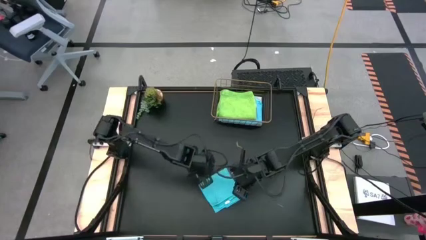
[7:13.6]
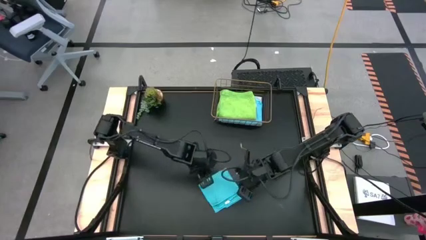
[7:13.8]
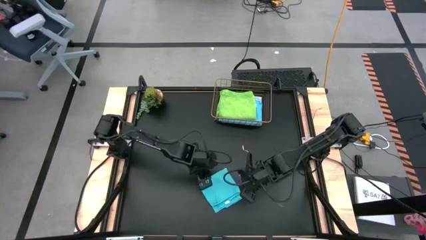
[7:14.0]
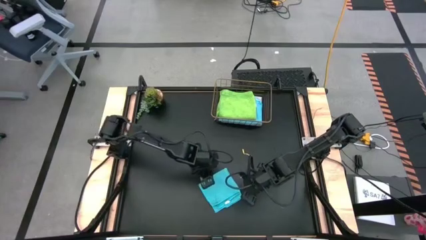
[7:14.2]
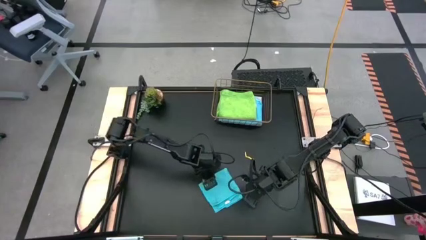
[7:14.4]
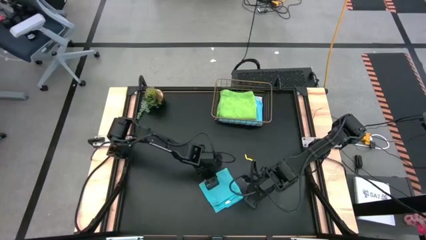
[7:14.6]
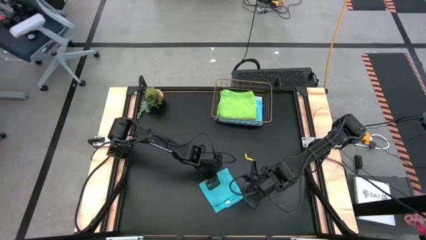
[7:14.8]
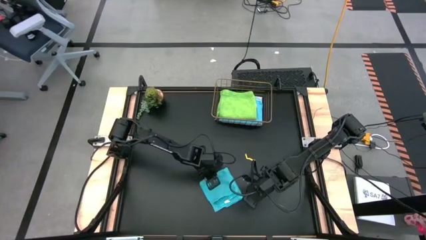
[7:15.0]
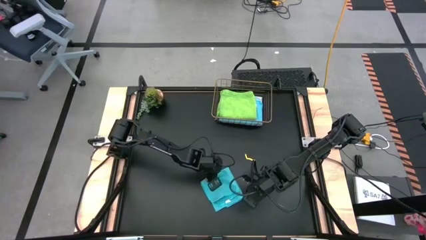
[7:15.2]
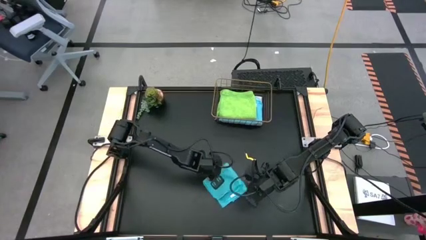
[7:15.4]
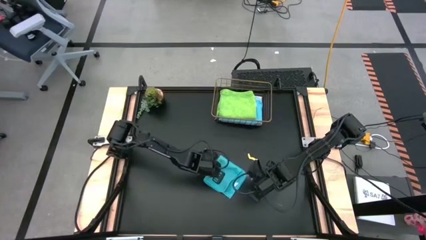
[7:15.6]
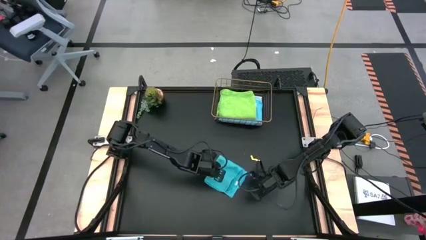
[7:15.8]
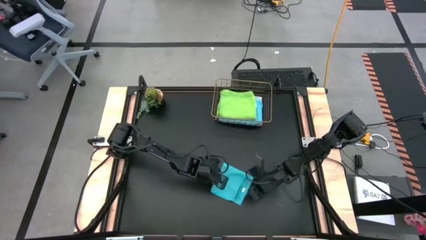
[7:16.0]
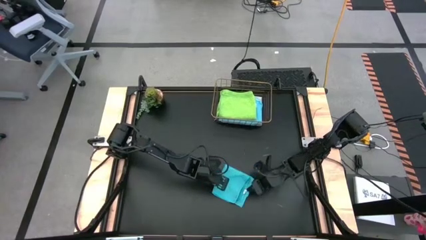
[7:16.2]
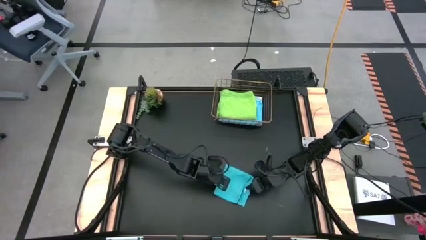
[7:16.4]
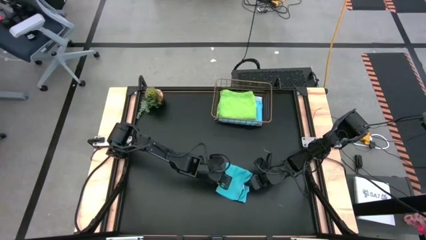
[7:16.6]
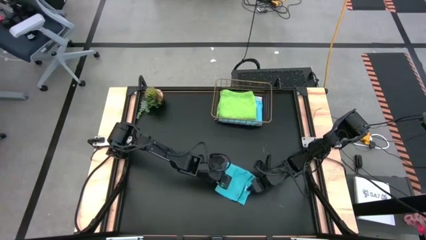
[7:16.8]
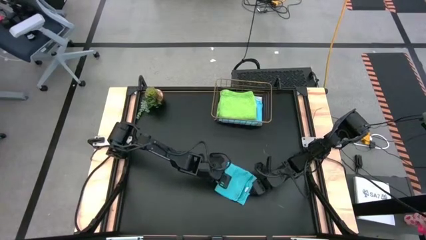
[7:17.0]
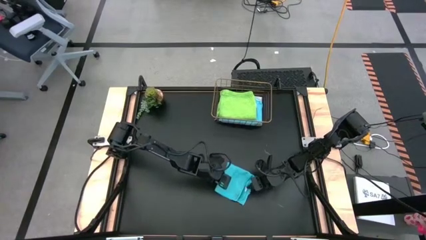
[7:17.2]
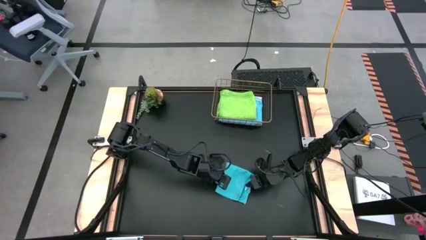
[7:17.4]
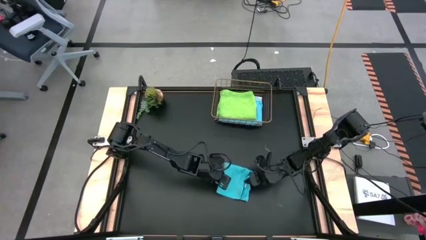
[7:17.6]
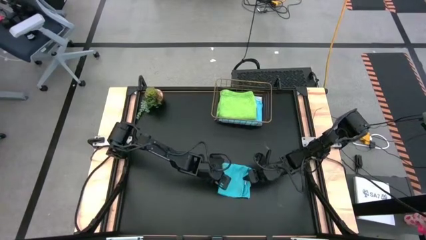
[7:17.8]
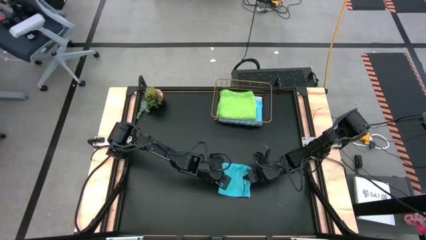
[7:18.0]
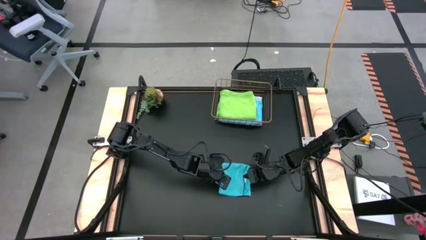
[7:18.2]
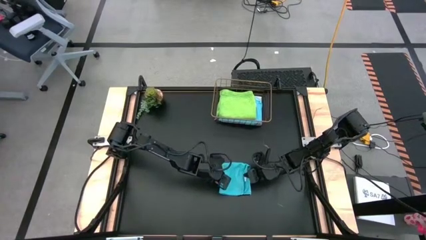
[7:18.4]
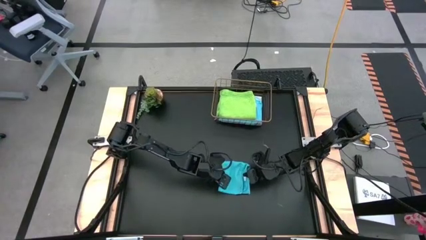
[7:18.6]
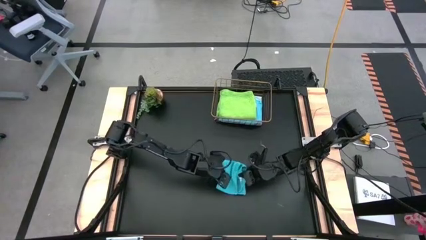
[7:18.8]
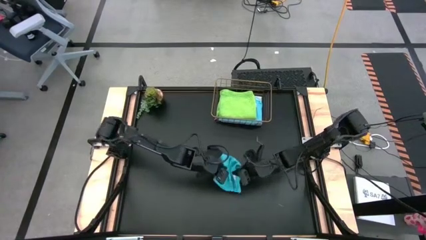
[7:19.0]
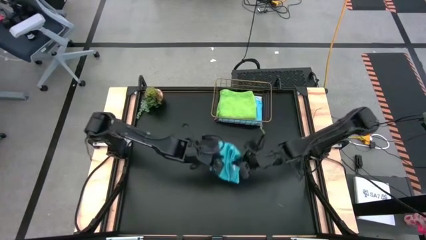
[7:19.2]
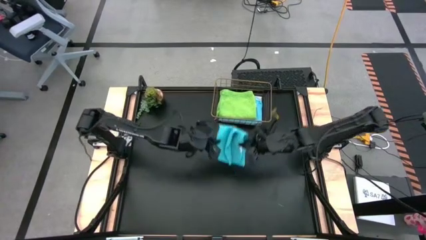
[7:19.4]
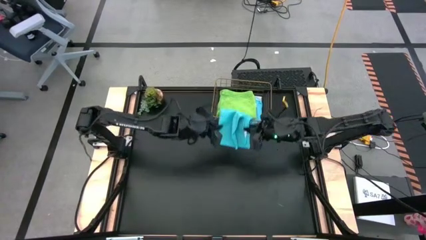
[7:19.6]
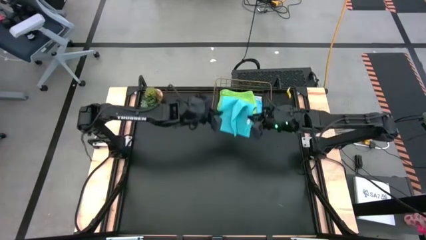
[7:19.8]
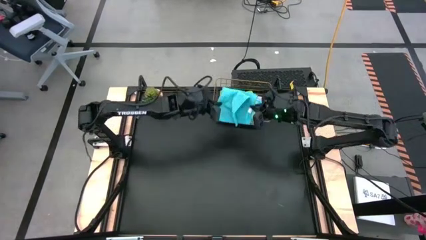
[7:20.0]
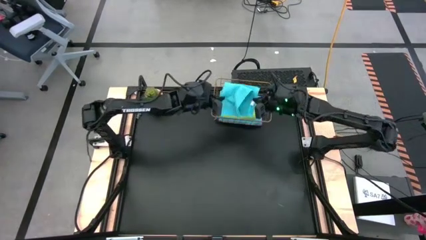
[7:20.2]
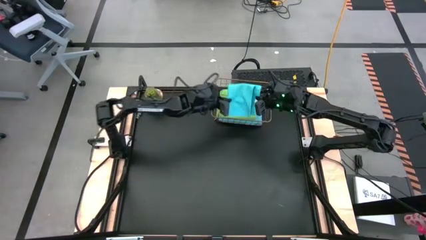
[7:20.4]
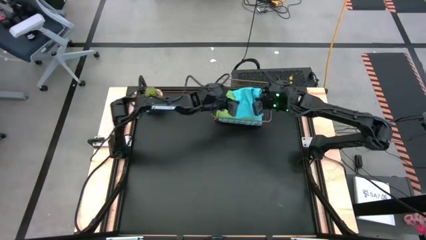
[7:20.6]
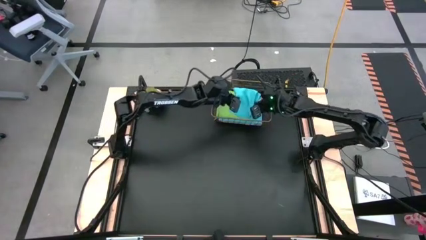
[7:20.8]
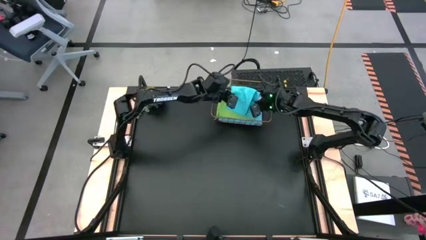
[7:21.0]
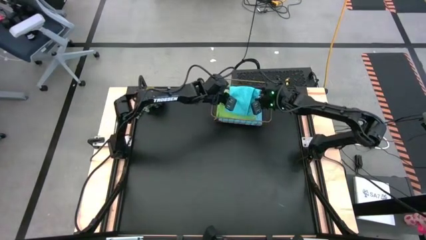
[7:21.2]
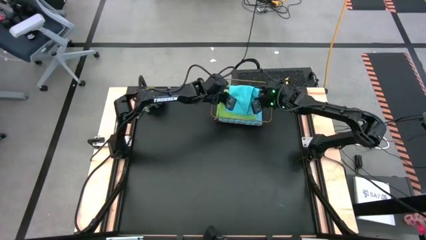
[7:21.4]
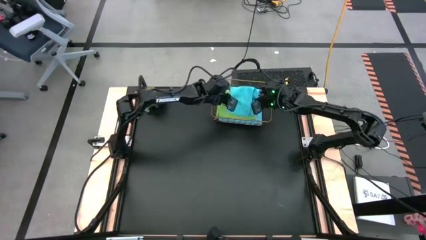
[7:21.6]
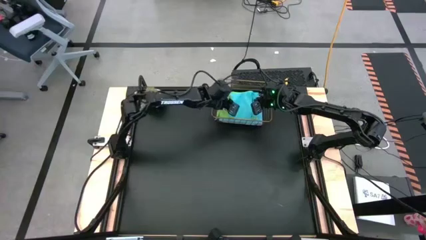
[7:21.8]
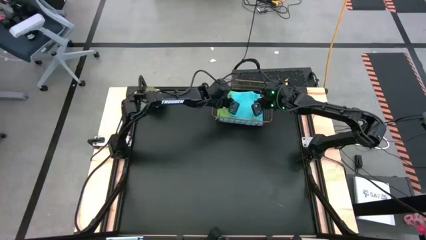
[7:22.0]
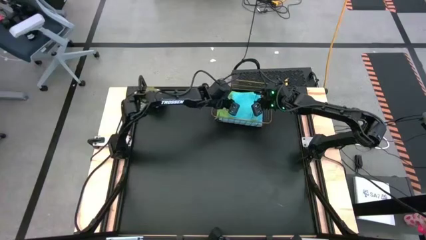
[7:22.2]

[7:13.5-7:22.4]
Task: Fold microfiber towels
Put the blue towel into the wire basket

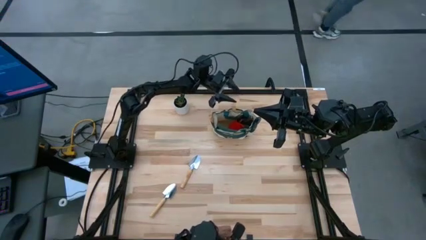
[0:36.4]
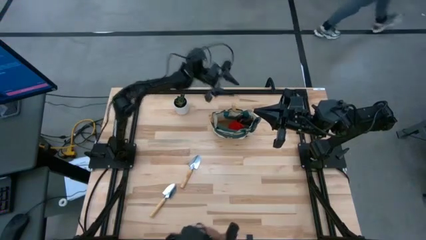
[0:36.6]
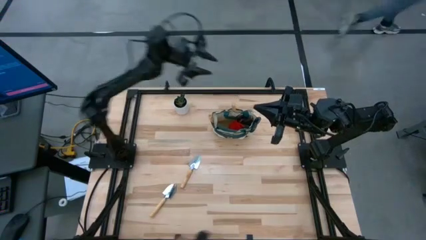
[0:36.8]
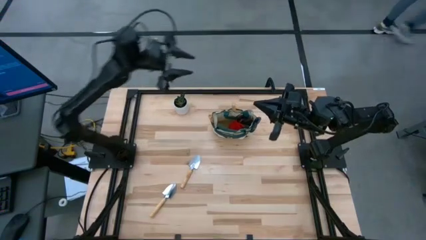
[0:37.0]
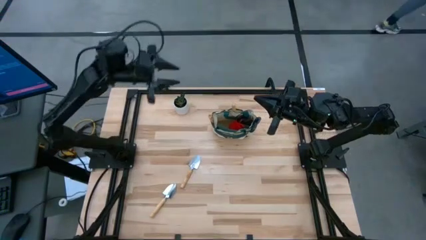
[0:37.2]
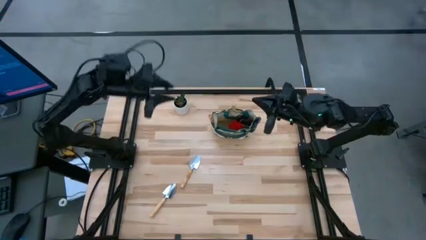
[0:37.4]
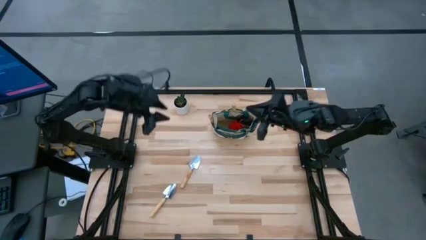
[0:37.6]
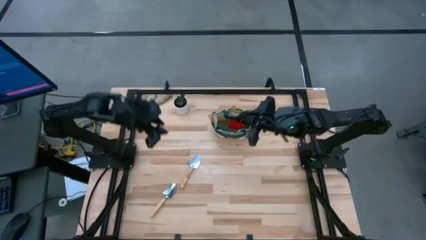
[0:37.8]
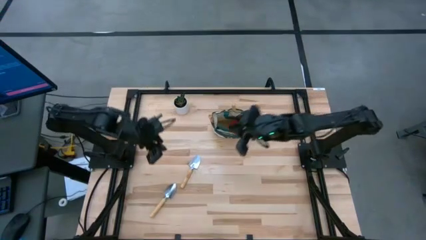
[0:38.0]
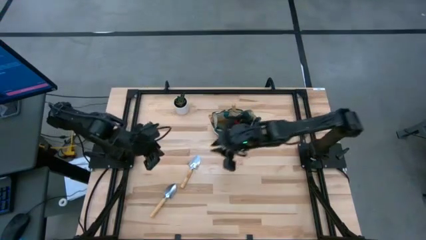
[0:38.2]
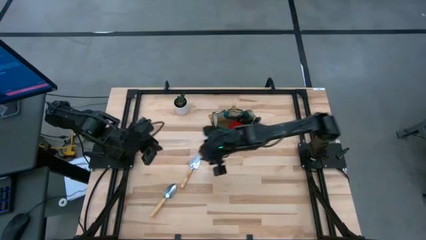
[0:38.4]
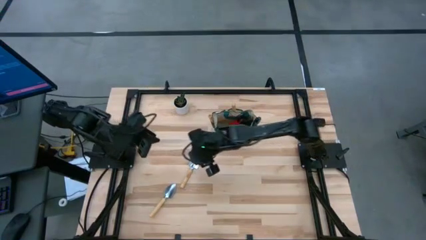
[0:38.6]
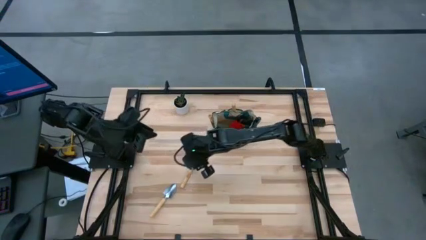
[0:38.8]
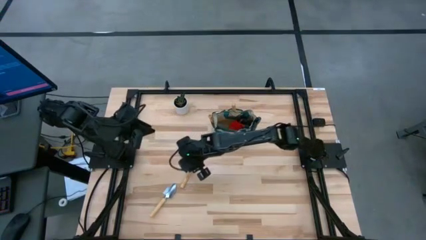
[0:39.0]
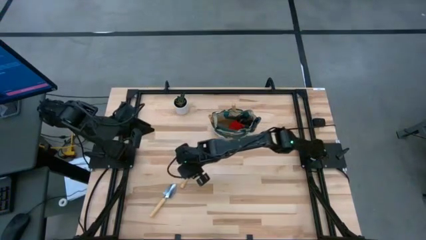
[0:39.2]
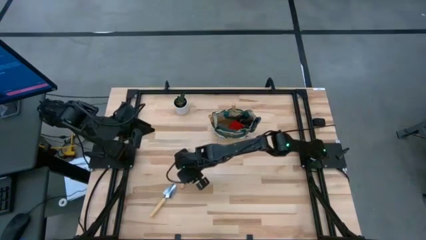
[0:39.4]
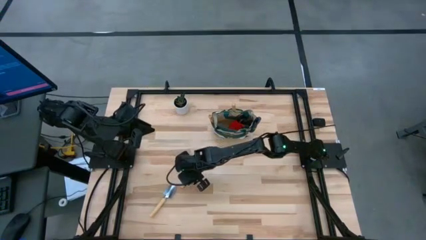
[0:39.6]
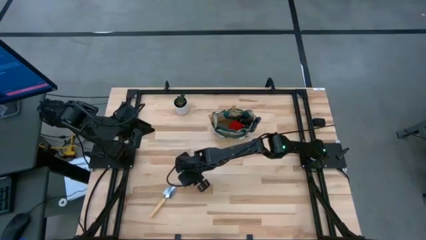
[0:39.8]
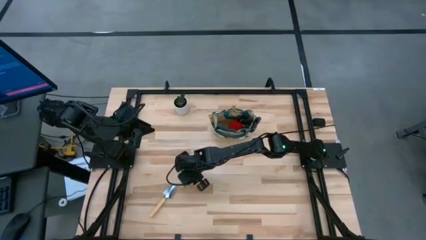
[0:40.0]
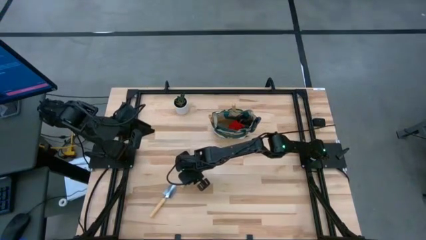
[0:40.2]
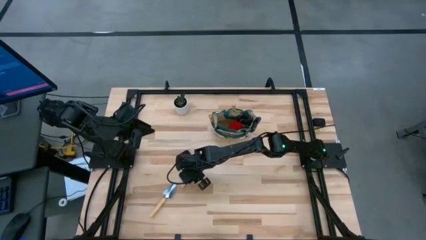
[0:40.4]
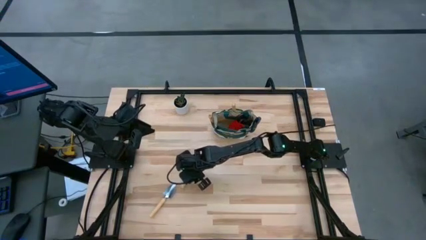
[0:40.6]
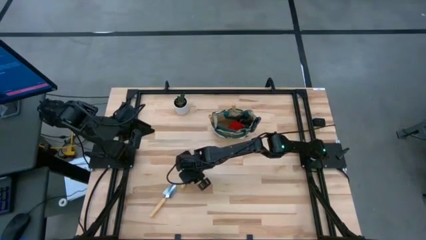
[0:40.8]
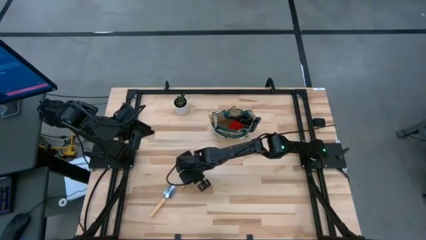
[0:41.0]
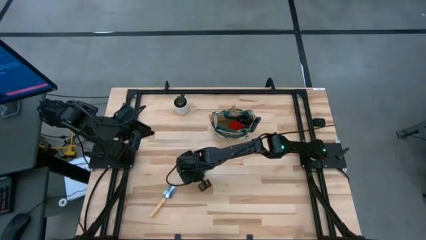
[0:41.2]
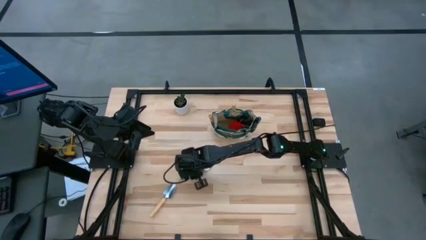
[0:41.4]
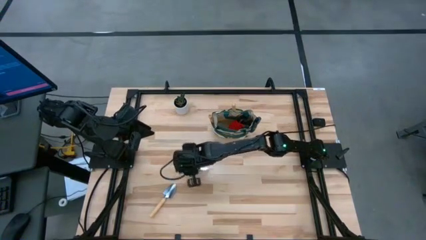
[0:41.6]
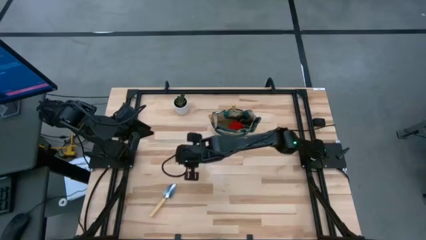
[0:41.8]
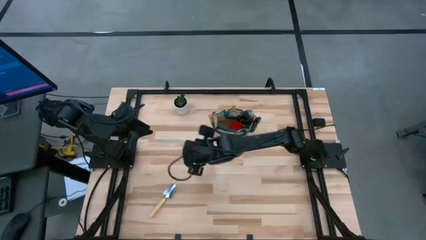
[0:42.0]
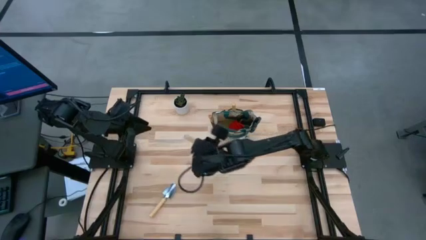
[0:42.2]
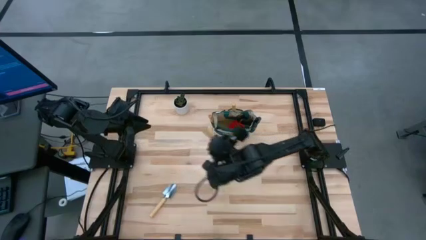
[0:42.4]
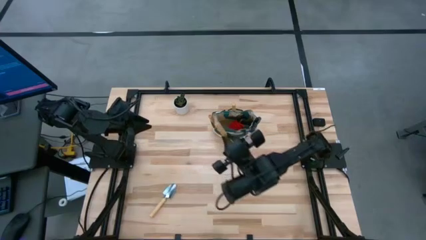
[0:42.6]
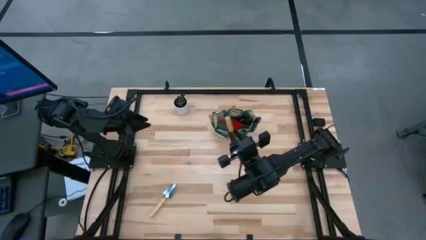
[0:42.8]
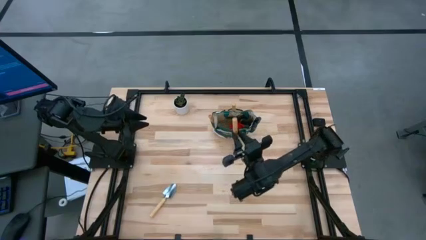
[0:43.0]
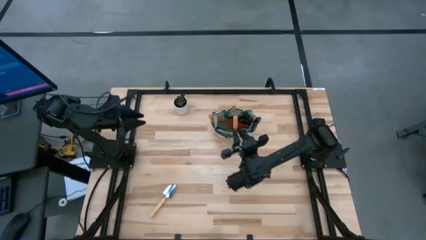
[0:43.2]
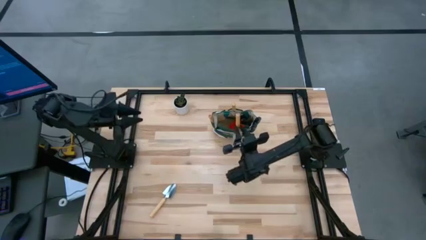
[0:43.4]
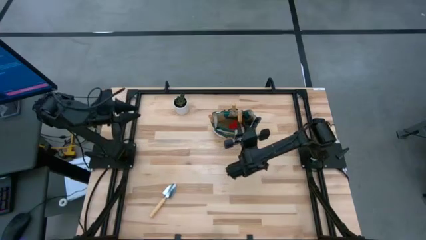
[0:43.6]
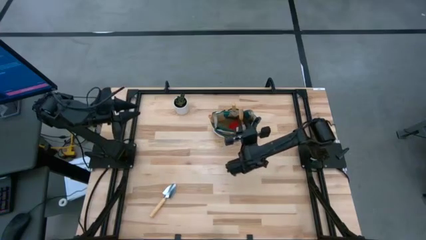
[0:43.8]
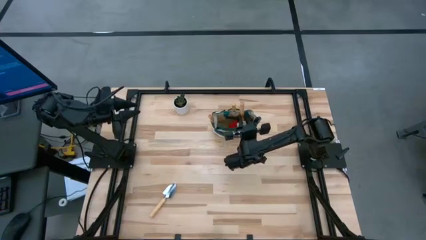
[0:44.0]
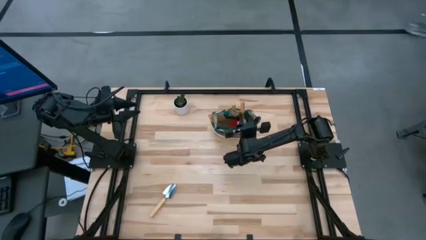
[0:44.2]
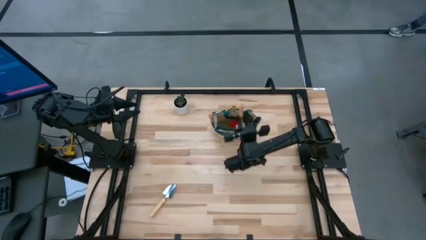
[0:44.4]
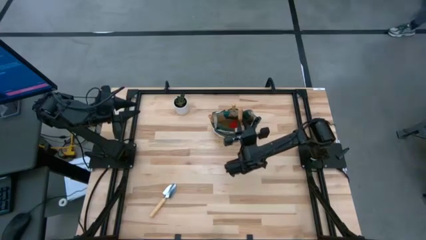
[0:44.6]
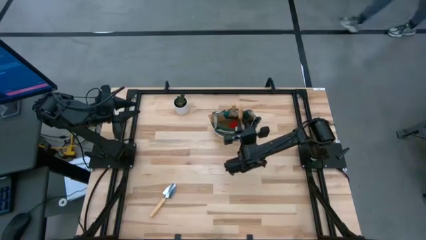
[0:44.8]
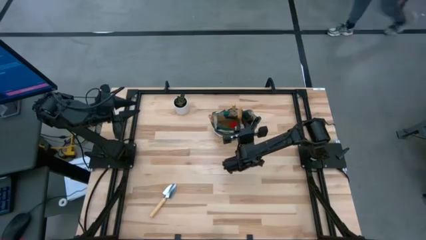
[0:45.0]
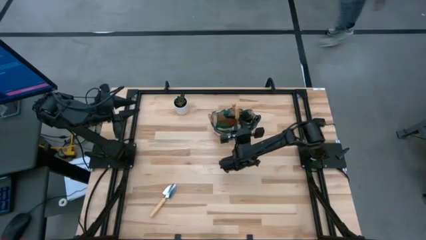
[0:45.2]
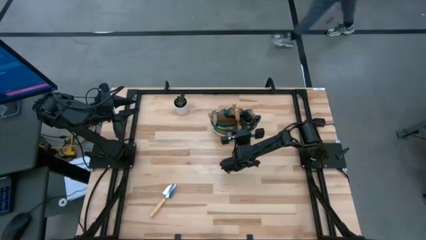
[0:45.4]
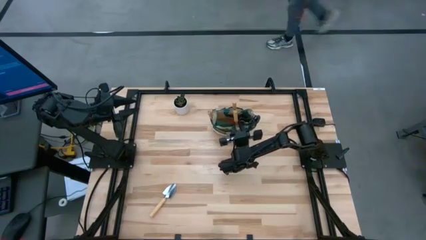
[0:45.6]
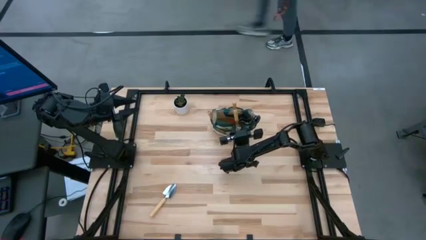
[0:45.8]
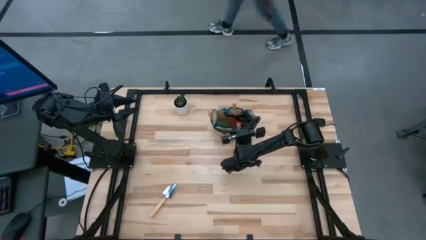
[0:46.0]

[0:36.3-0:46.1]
Task: Pick & Place Garden tools in Gardening bag
Put the brown trowel into the gardening bag
